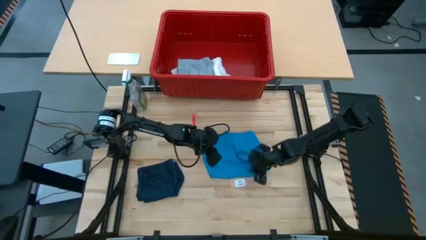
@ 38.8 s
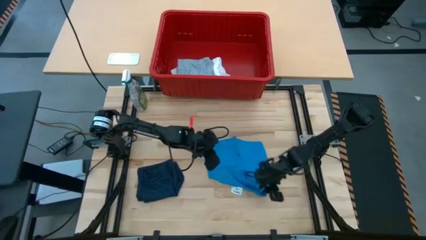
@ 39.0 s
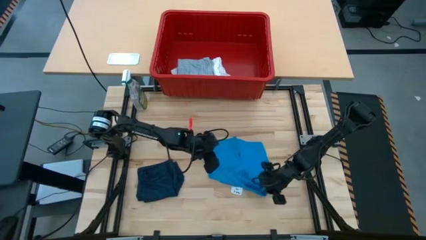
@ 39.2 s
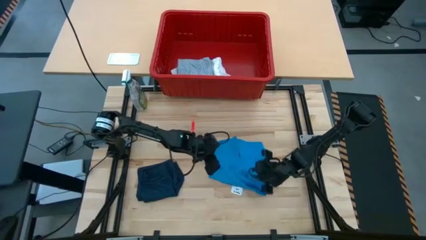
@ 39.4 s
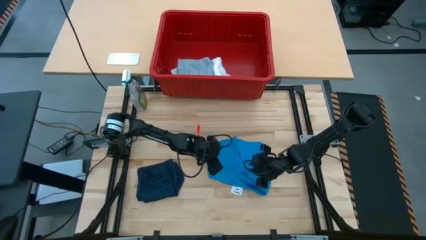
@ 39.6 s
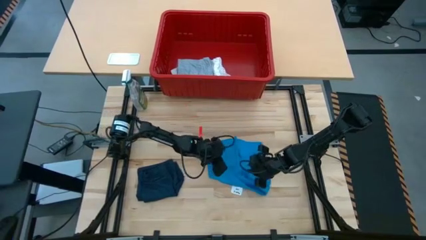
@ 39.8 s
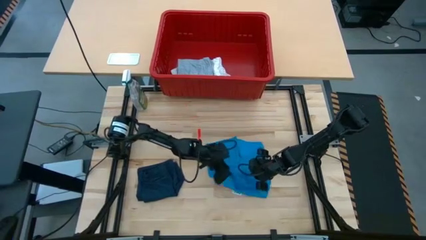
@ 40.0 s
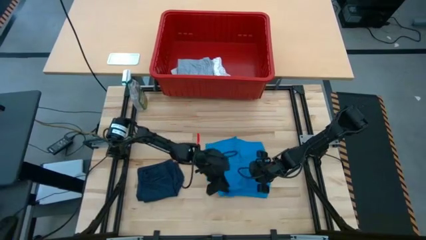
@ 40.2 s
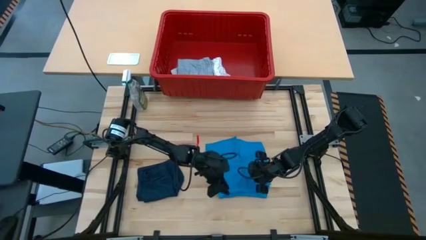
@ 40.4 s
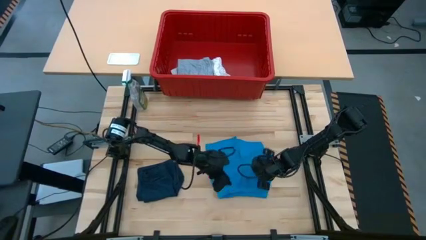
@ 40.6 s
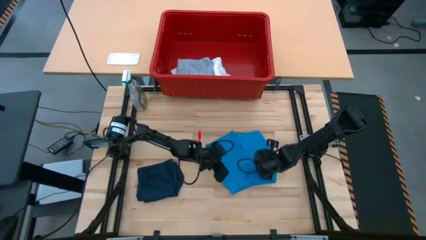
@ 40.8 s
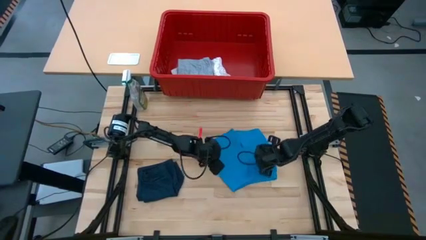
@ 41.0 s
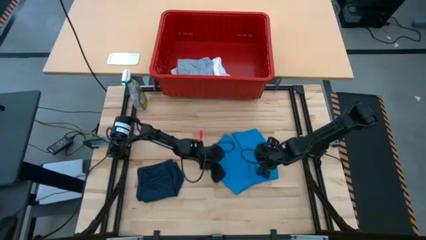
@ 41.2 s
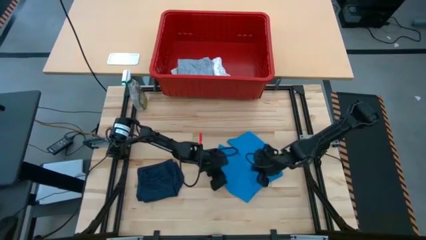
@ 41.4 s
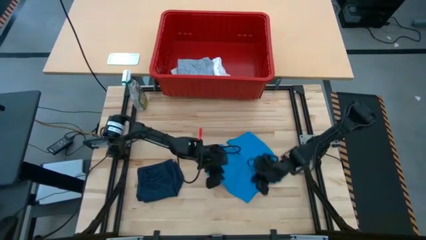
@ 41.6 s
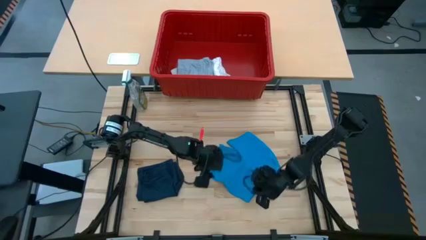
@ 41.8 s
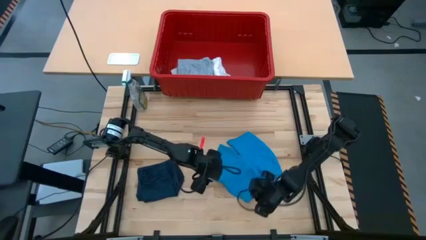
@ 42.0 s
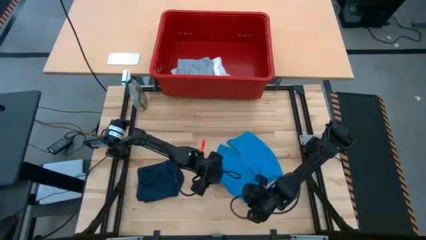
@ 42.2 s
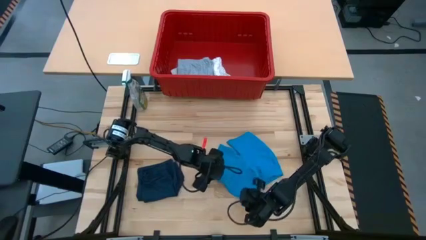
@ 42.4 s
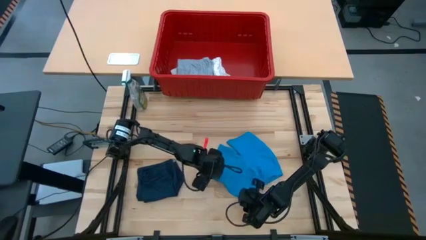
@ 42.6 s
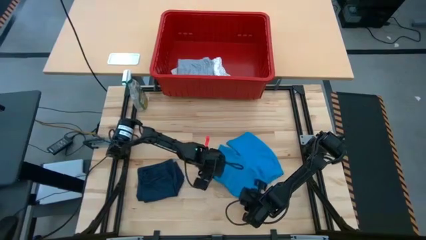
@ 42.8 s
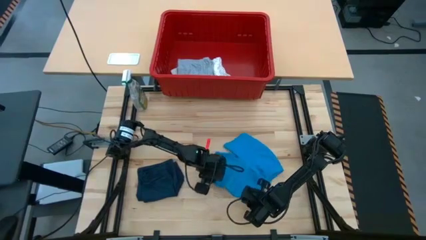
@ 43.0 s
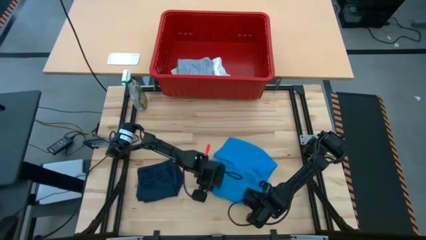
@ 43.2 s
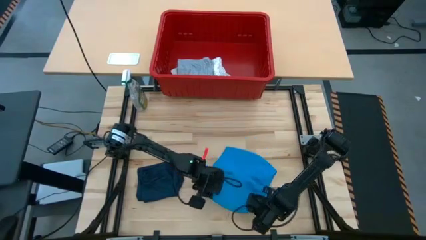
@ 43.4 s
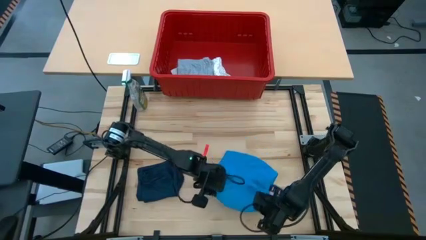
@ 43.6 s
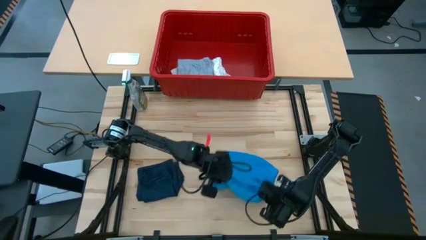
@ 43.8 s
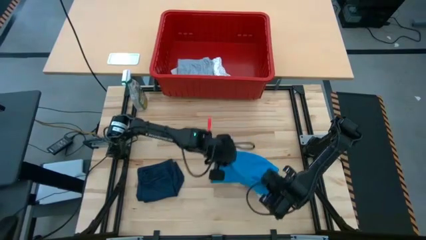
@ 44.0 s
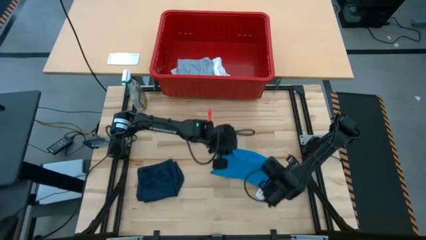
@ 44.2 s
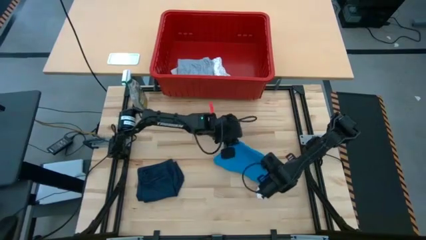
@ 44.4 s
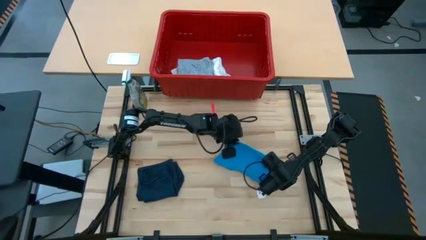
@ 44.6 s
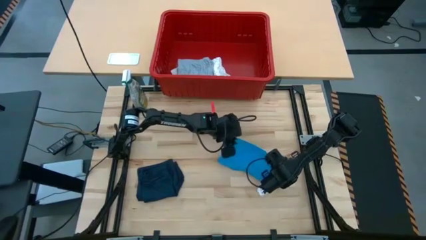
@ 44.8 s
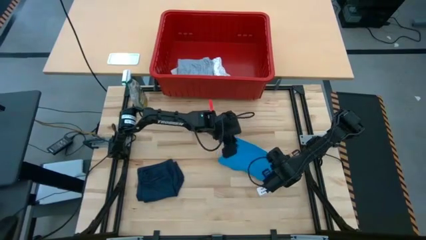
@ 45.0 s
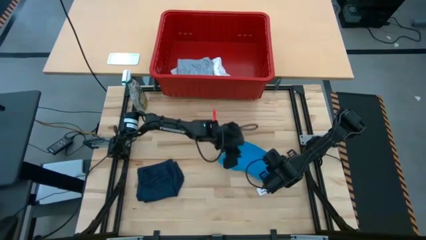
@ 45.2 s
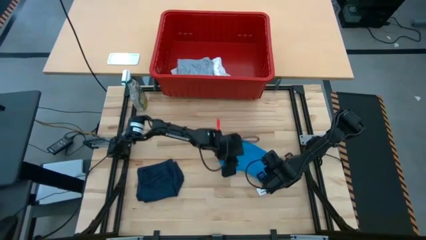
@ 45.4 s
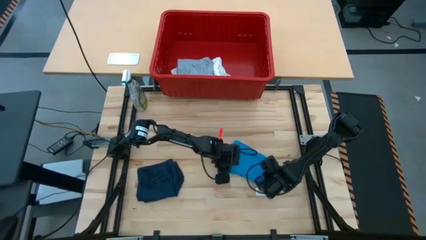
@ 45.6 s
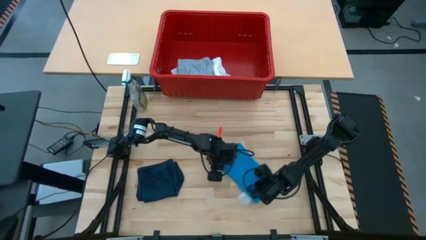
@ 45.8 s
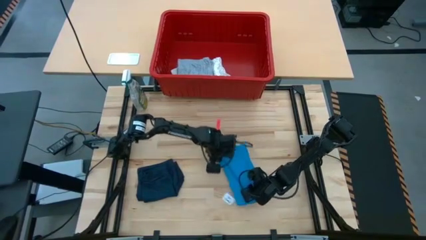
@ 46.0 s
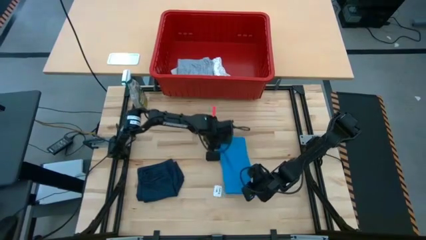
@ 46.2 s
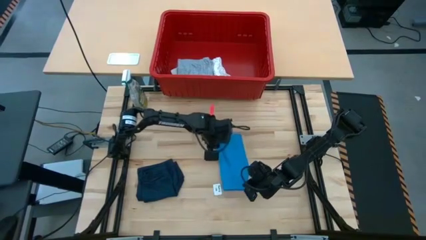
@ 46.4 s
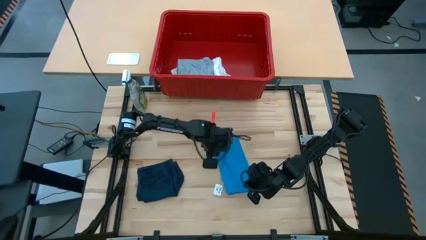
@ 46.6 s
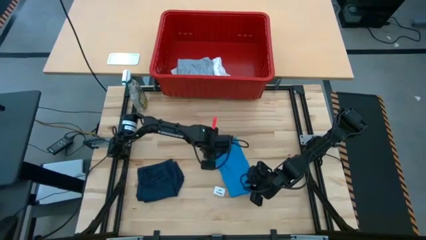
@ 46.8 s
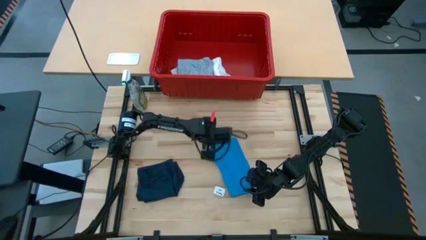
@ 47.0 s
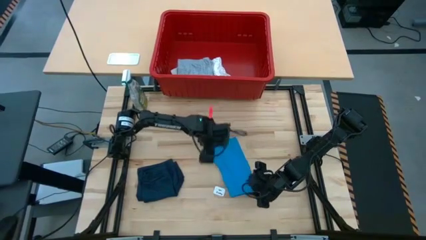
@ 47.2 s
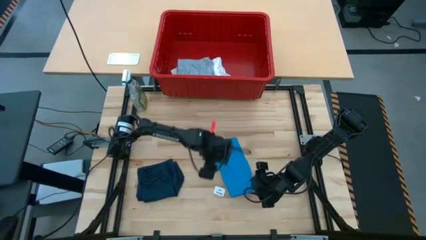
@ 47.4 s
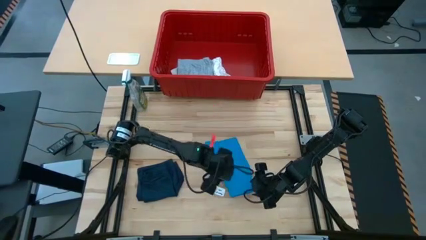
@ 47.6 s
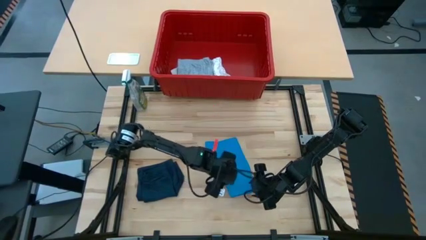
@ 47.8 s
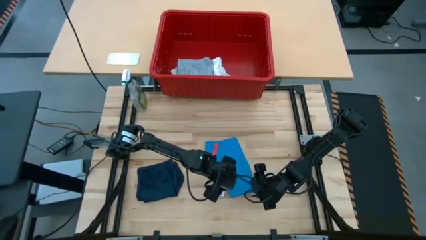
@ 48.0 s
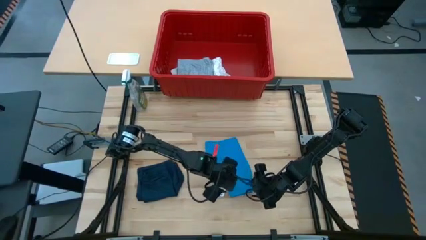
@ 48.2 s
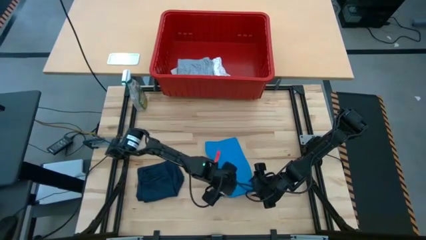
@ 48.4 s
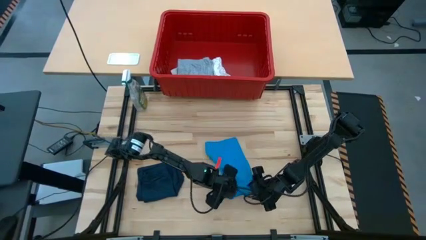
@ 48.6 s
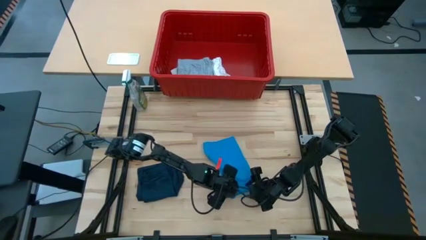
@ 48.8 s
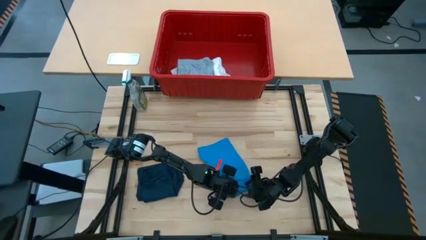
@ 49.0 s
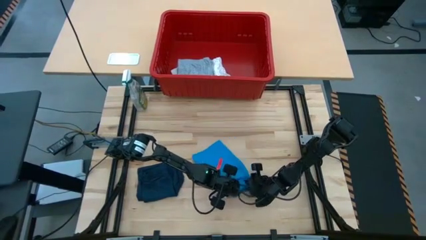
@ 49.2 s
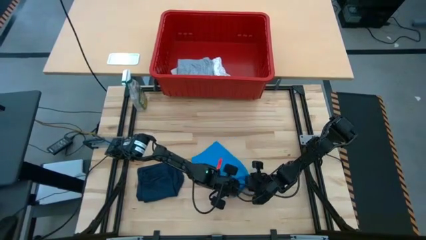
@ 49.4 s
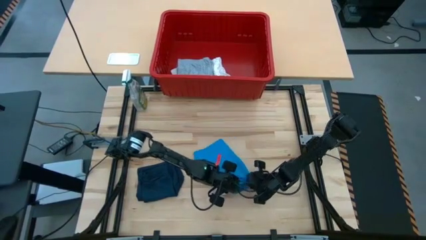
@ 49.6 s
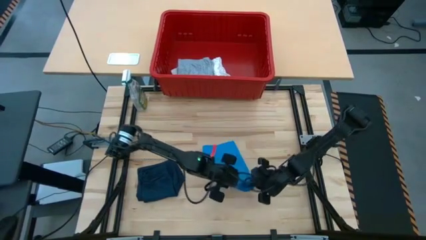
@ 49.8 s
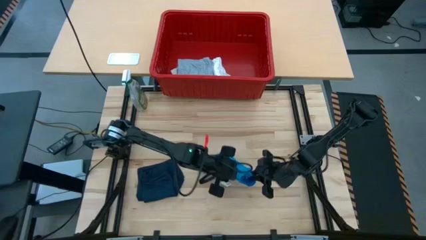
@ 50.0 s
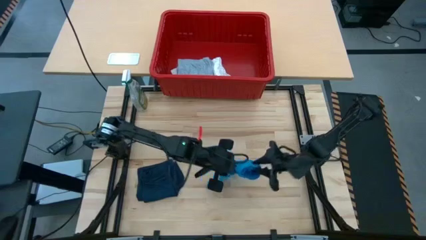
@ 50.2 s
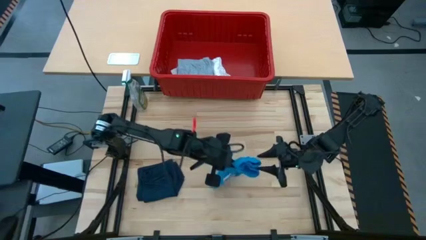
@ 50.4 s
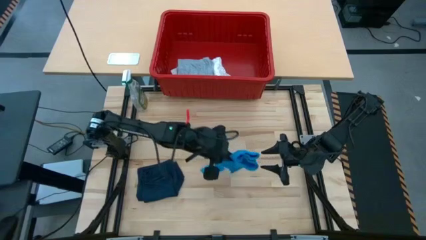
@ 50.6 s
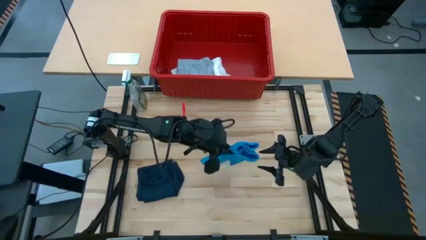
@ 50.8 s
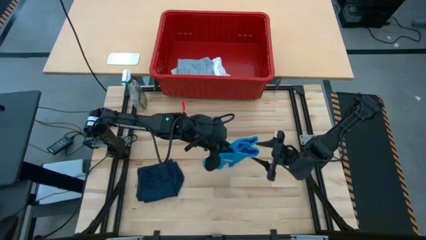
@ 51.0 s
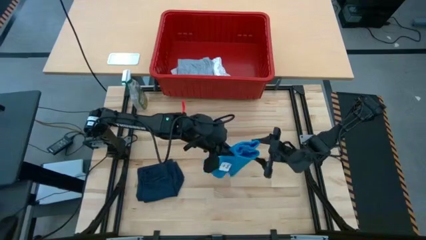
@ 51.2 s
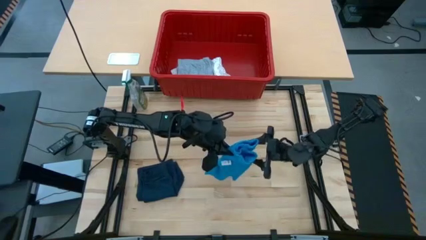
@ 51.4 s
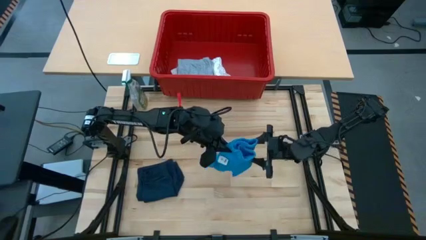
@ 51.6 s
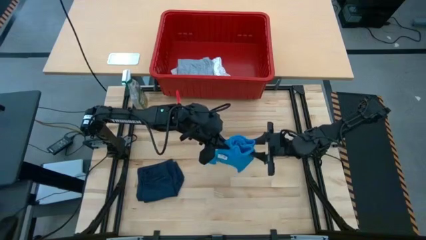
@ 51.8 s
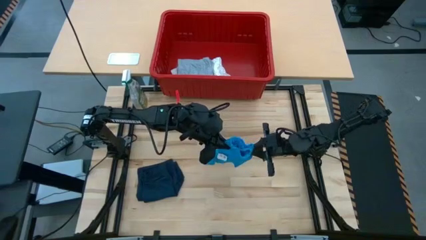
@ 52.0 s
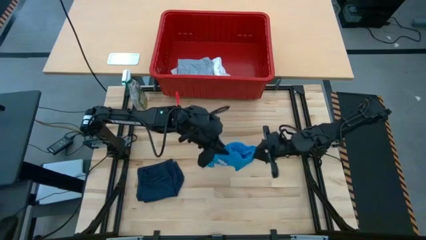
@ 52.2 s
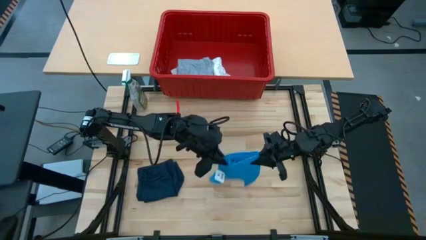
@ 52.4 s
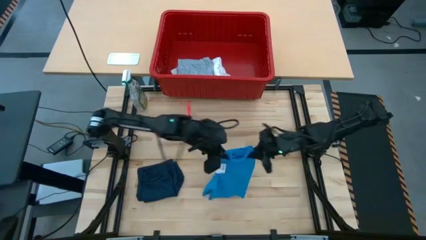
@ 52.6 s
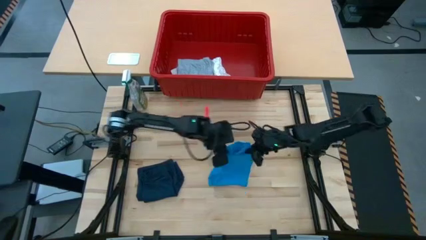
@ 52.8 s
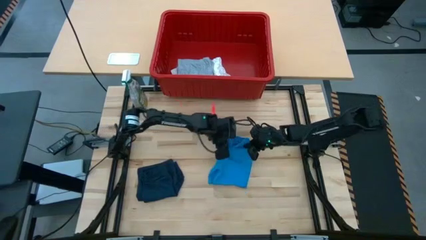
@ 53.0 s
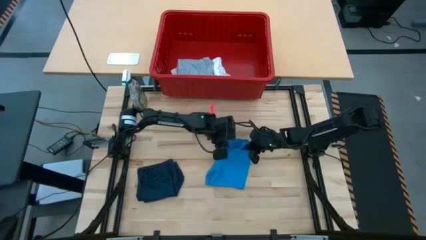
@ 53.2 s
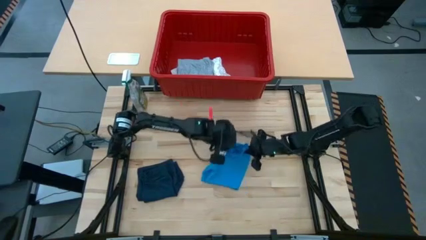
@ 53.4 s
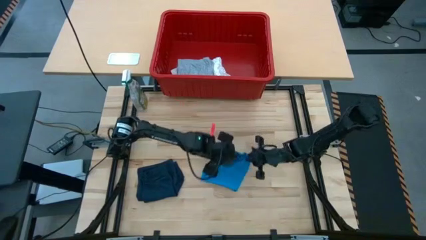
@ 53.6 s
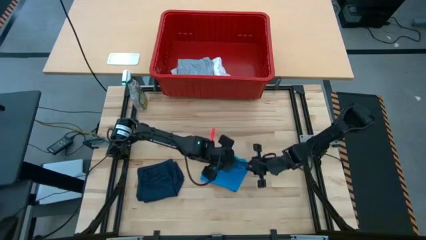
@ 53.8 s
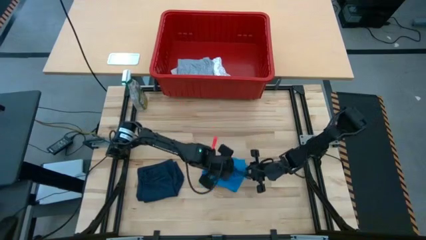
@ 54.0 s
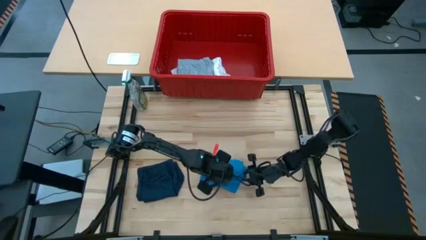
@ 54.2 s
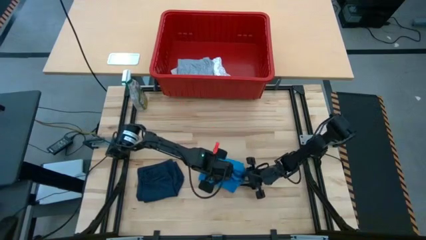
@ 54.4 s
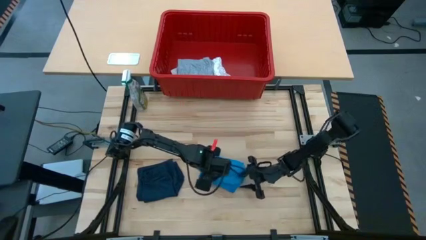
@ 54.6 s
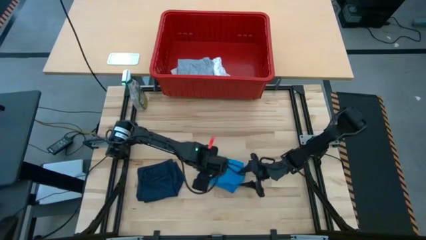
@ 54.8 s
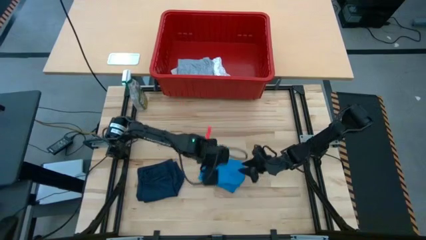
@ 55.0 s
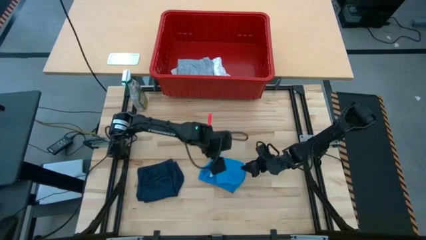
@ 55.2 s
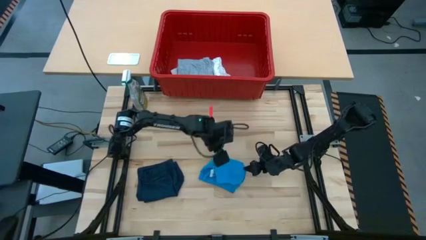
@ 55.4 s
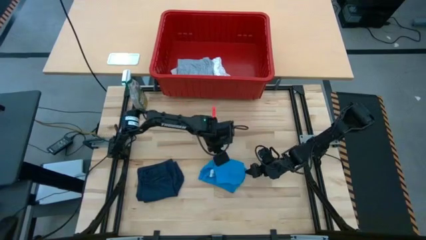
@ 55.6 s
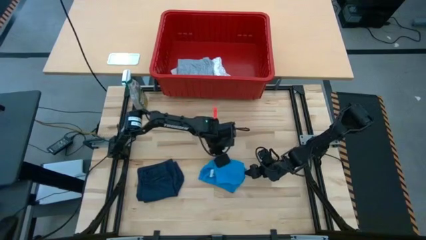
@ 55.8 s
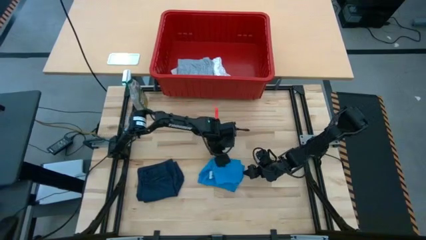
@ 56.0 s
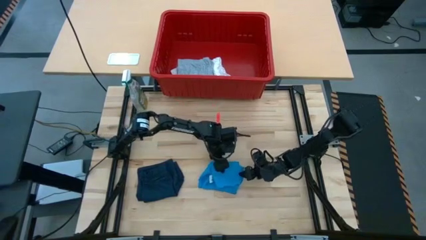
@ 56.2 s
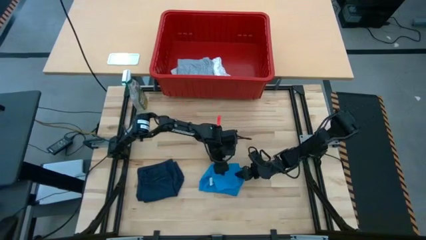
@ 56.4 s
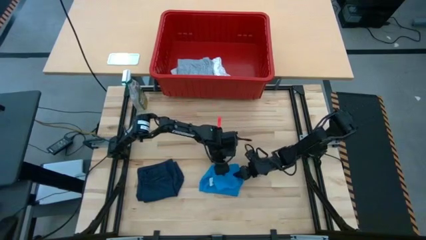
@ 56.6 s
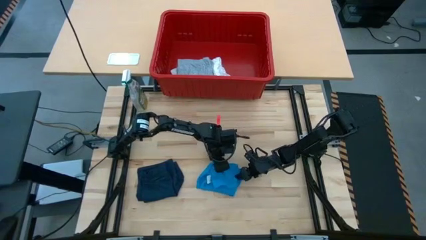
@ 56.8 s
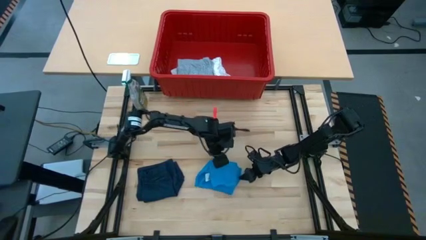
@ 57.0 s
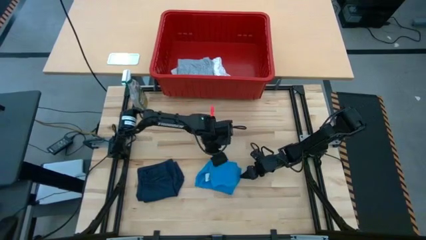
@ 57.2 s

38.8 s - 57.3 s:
Task: Fold laundry
Fold the light blue shorts
